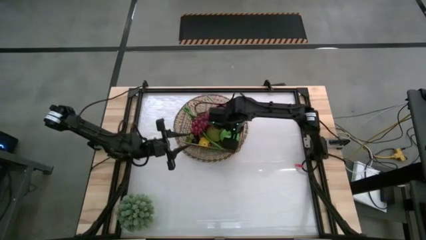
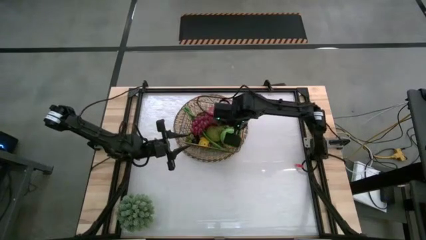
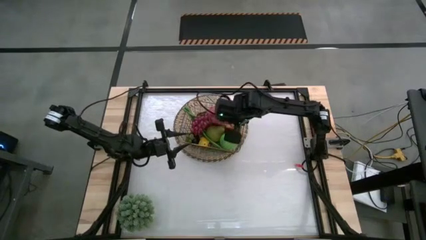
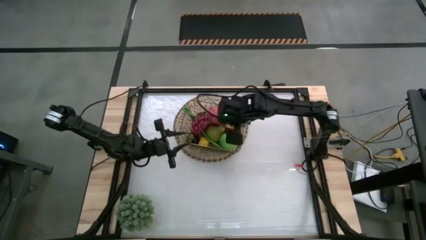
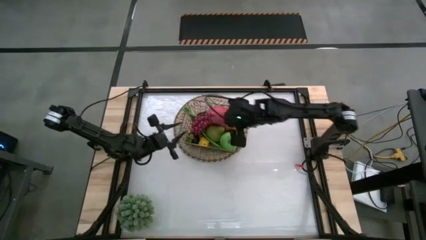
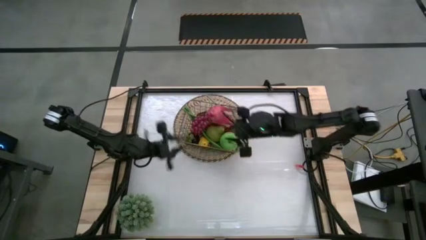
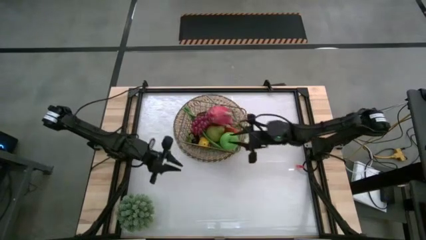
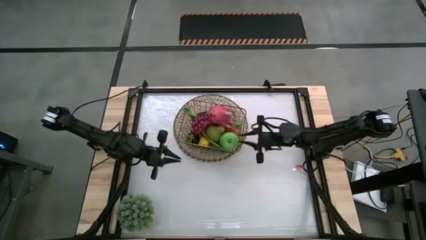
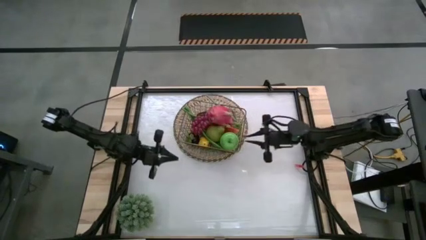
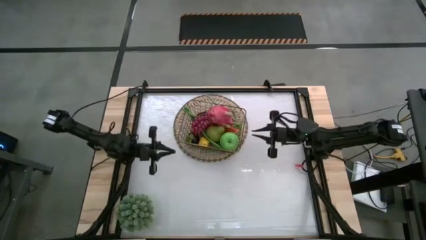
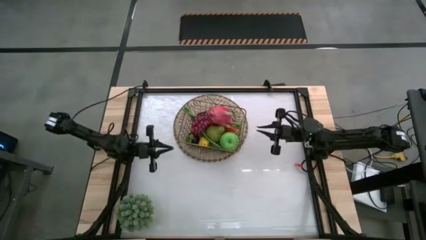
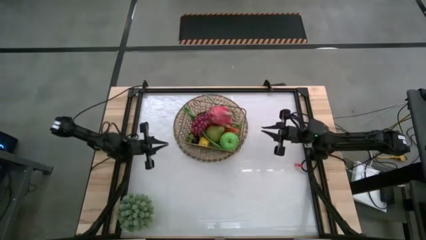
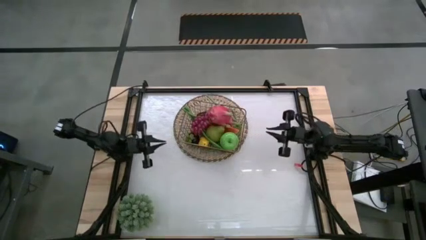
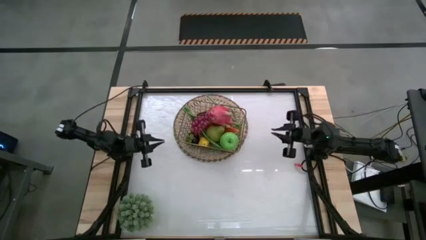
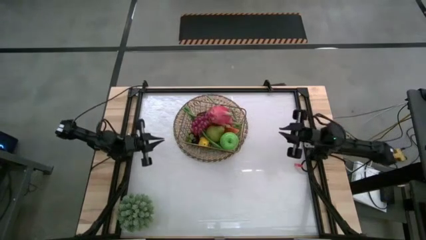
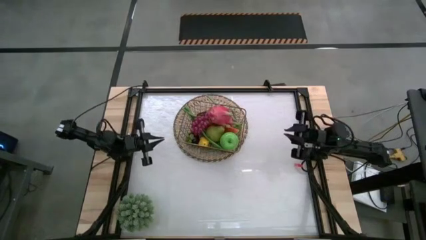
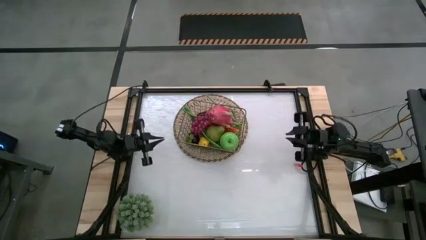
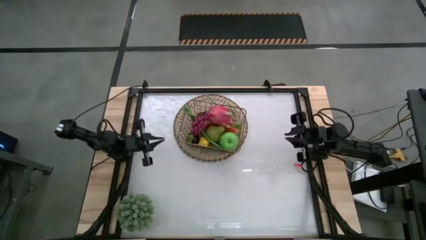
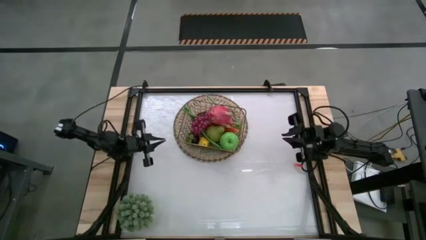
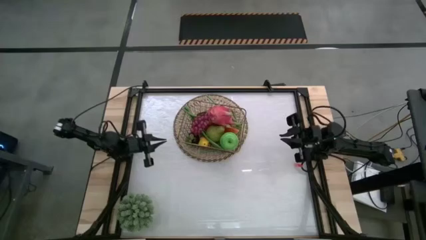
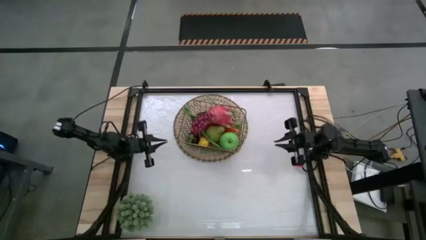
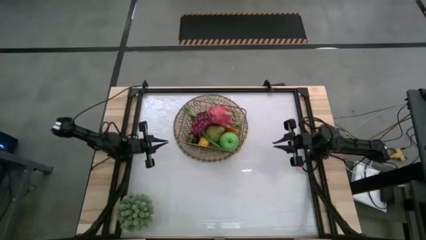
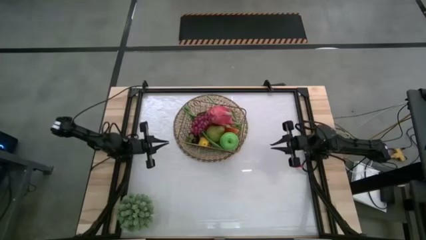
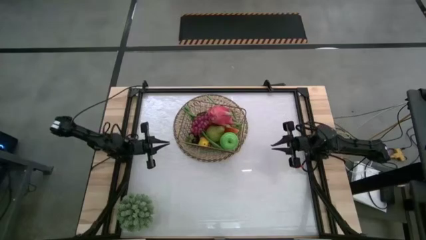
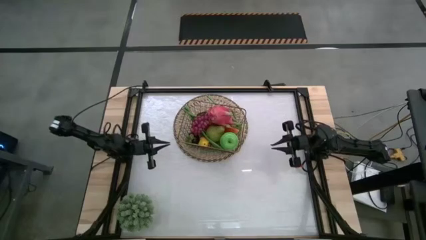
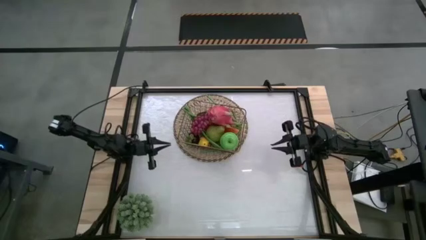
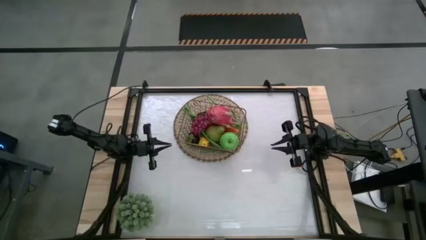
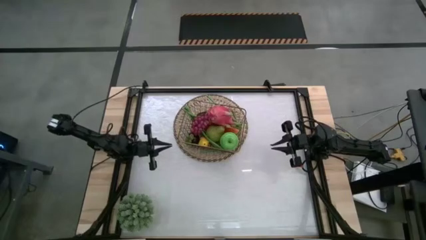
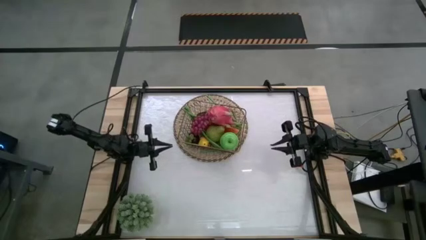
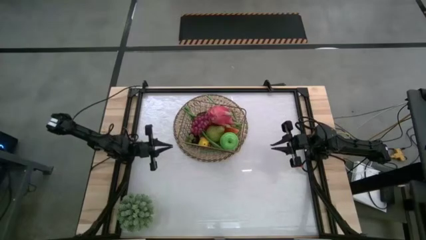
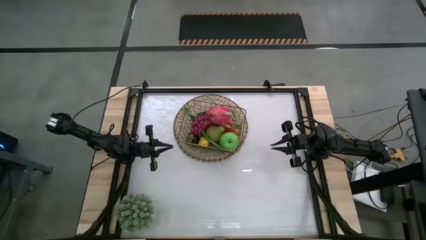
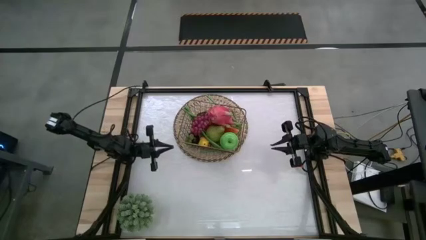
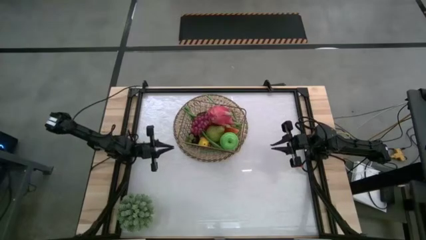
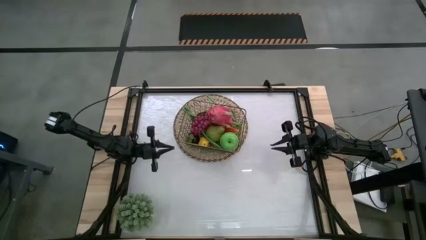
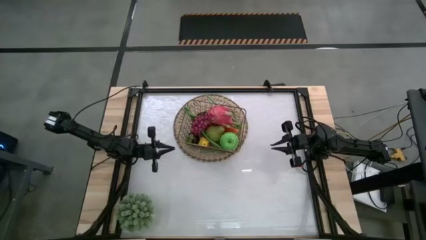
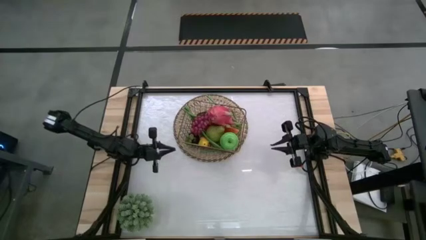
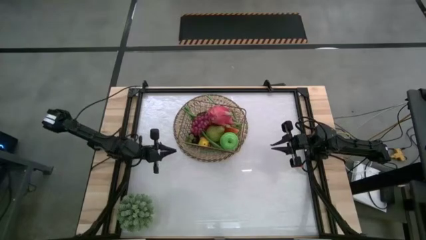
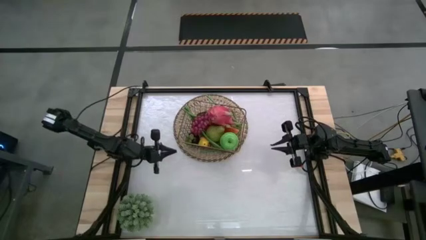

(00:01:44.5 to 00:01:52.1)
Task: Build produce basket
Return to Home Position

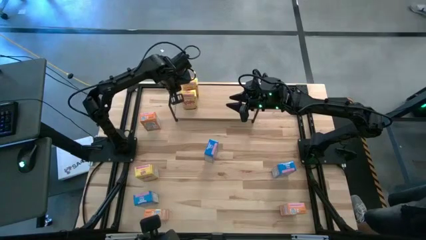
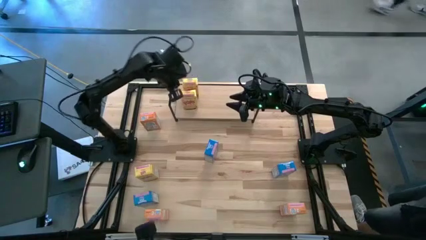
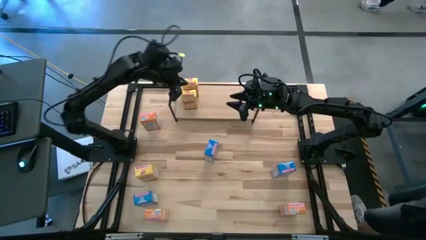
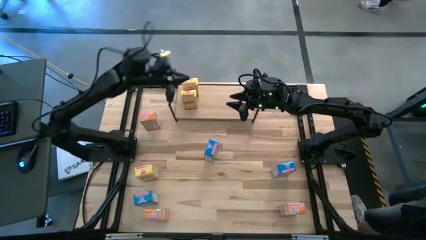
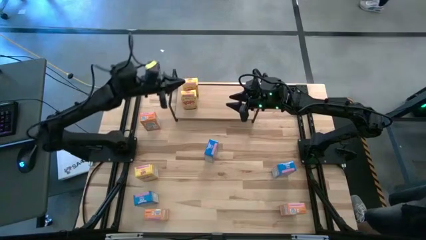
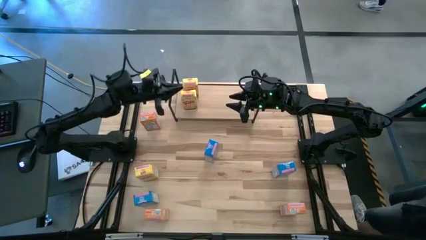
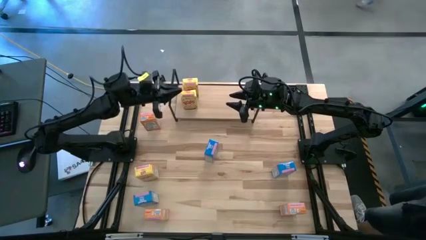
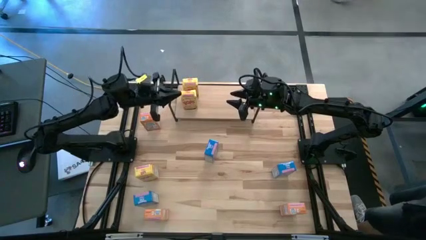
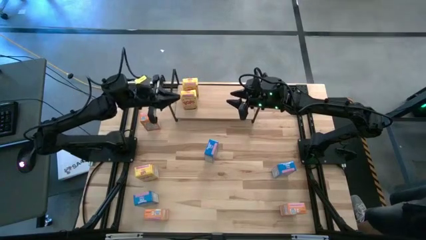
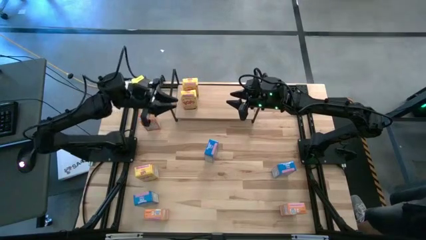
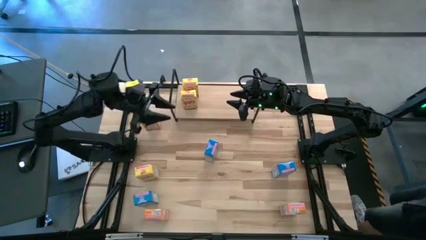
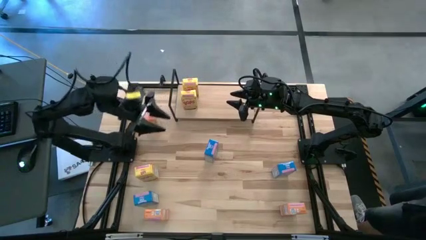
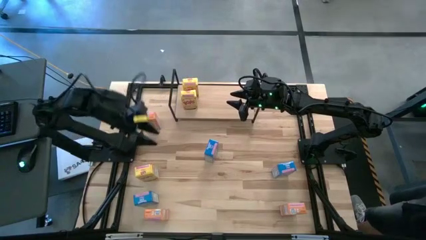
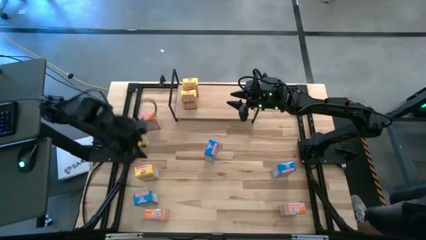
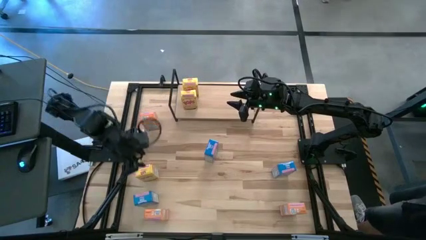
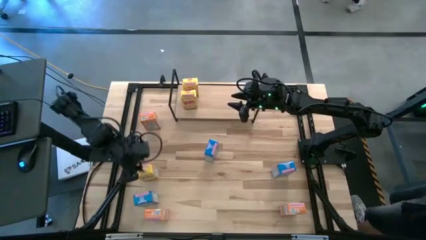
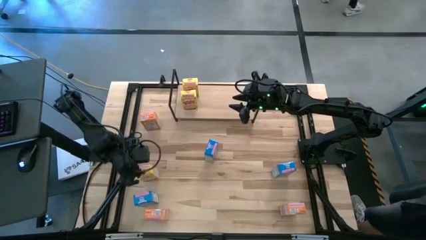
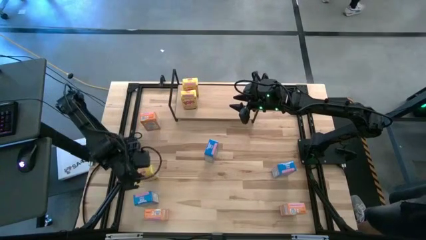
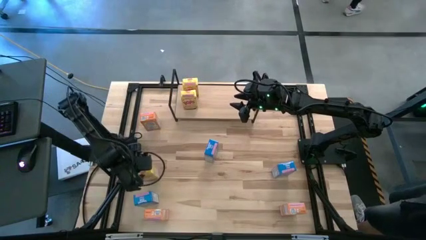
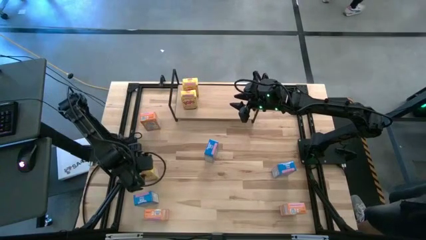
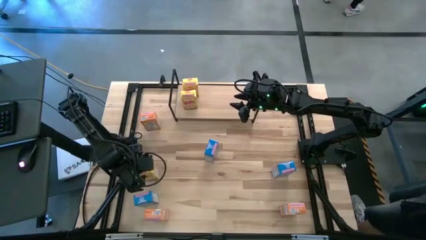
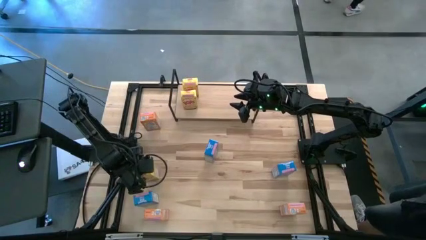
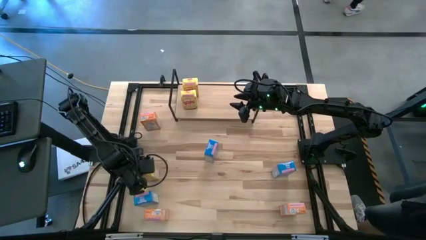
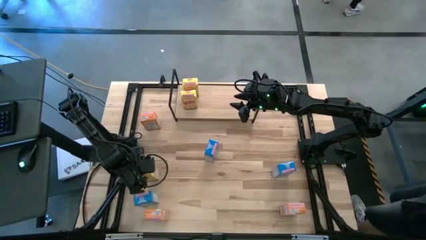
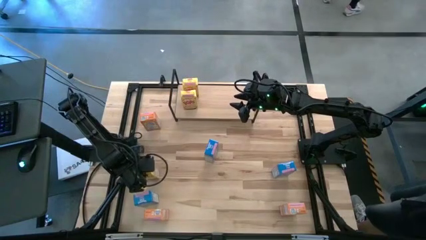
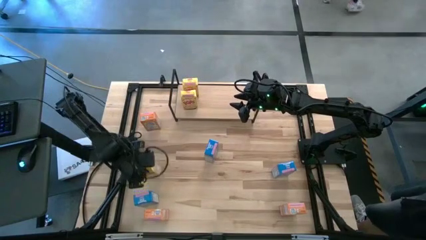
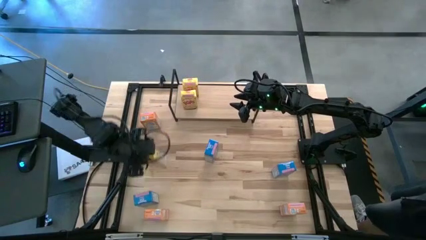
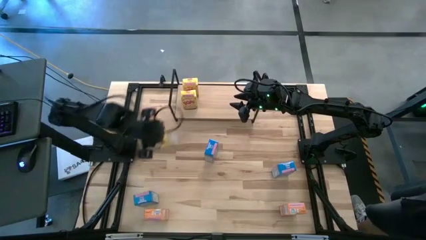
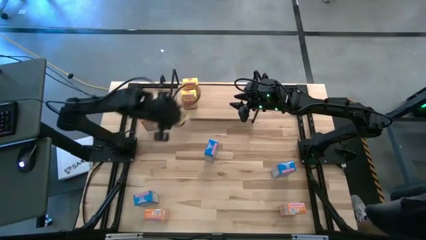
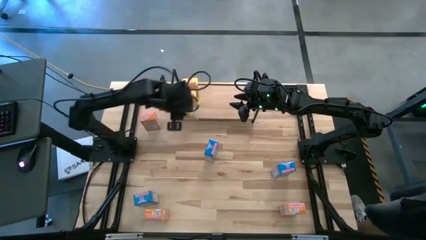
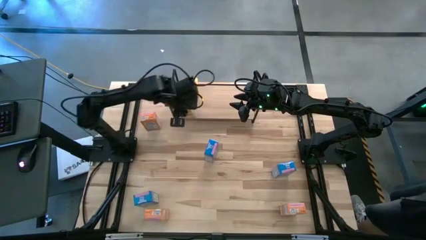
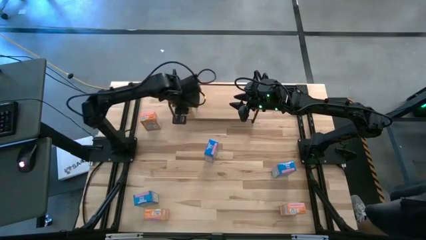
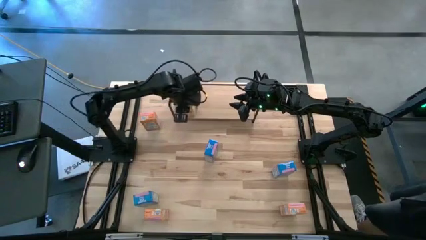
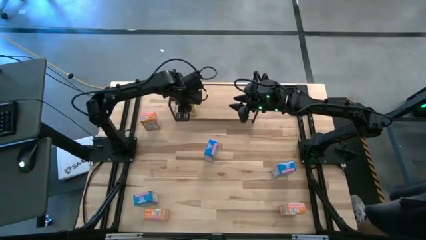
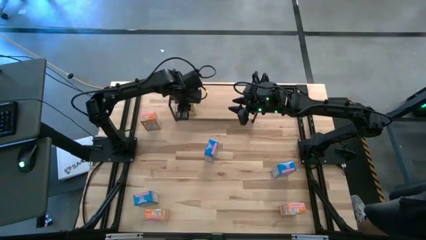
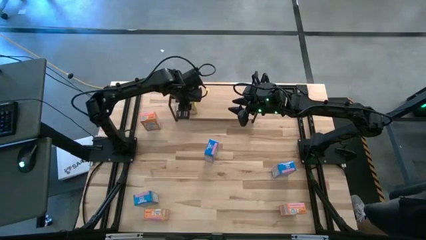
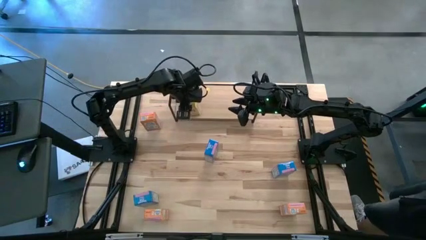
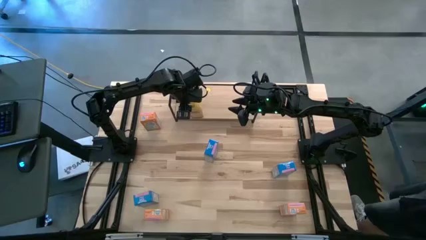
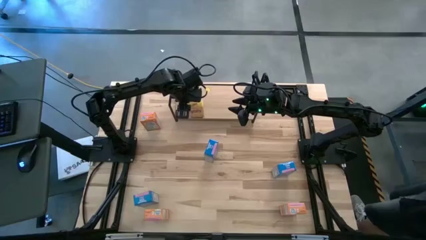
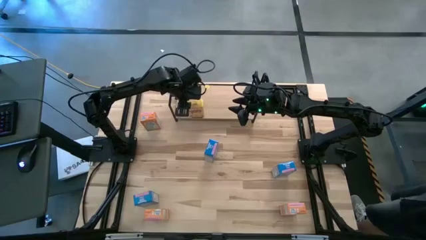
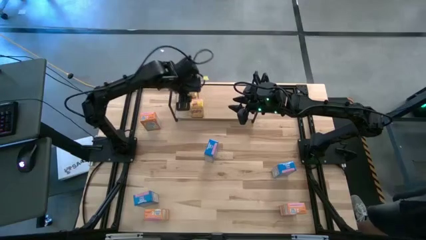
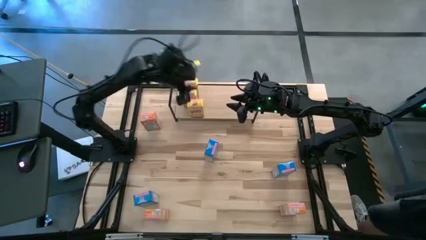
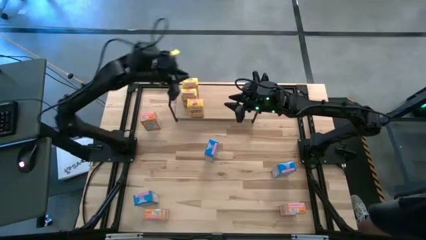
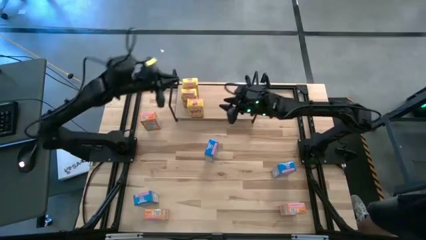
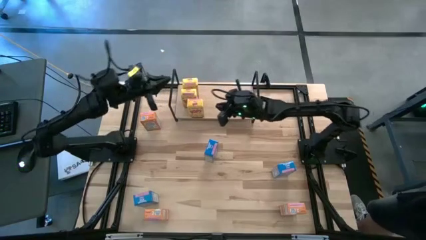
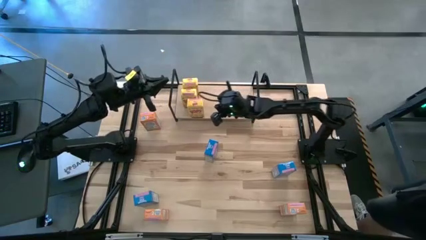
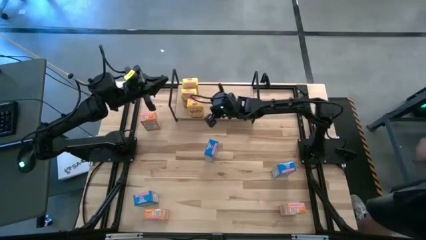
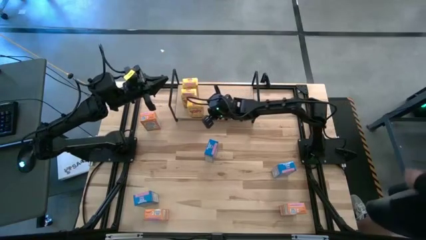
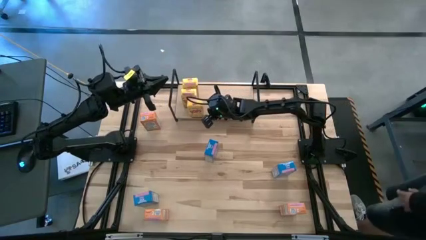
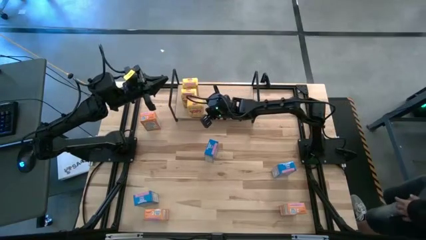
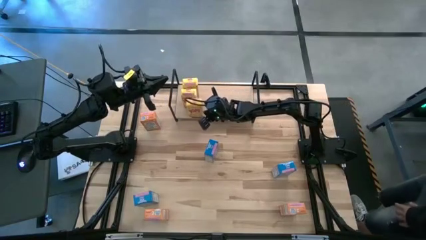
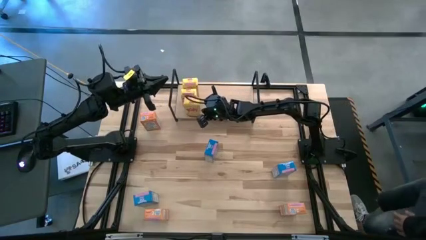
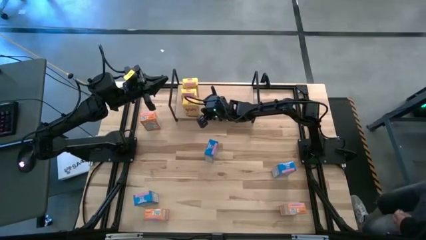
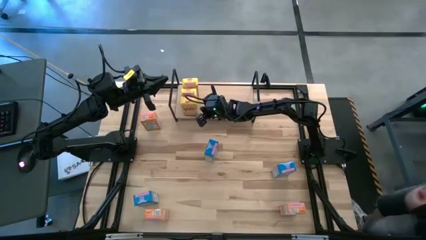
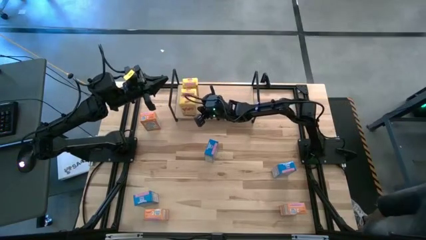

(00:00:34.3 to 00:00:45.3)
Task: Stack cereal on shelf
Put the yellow cereal box on the shelf aligned with the other yellow cereal boxes
